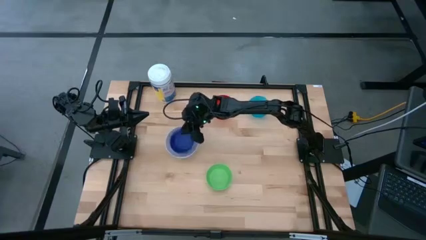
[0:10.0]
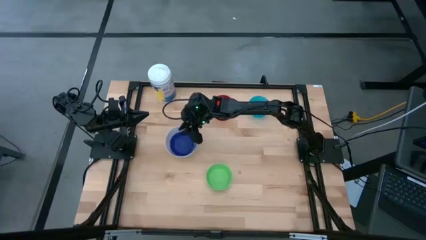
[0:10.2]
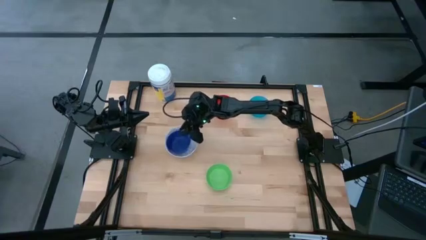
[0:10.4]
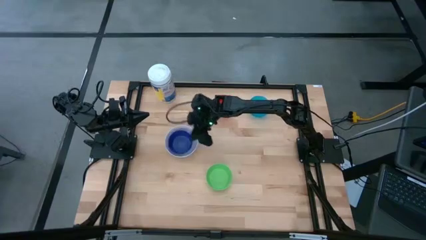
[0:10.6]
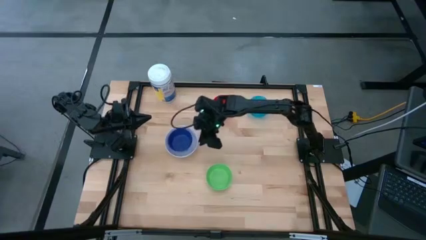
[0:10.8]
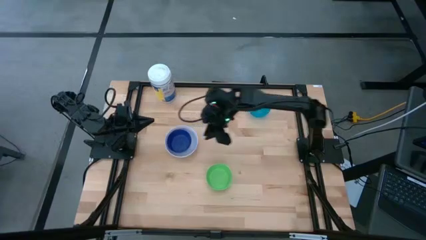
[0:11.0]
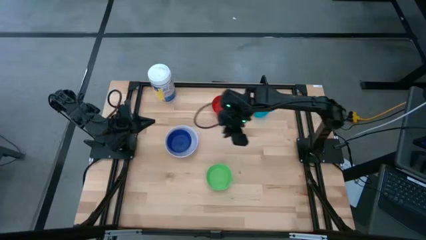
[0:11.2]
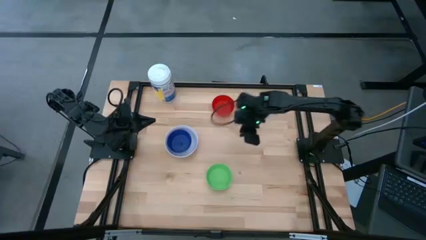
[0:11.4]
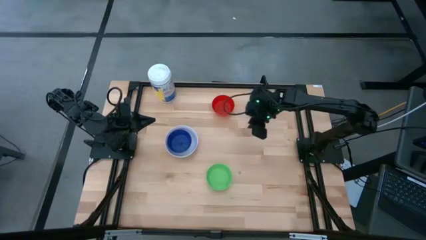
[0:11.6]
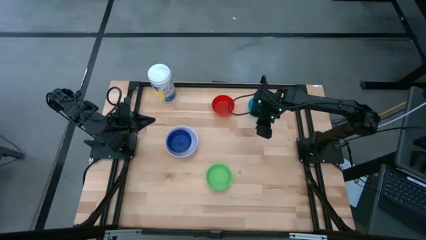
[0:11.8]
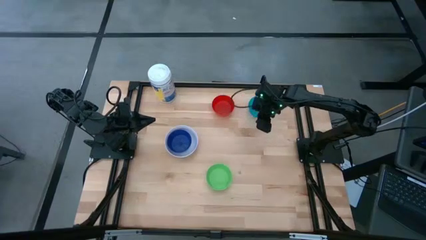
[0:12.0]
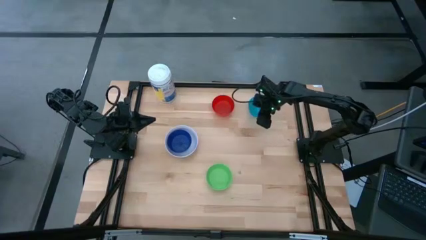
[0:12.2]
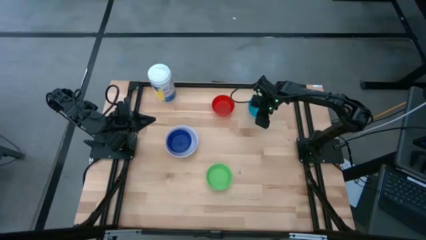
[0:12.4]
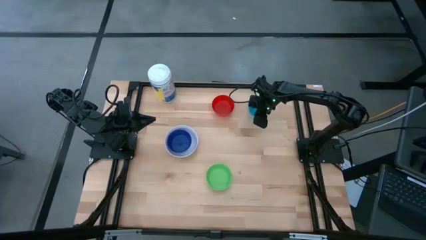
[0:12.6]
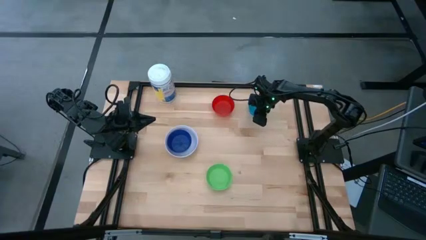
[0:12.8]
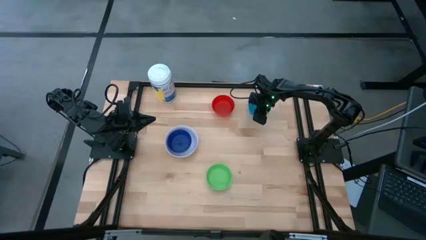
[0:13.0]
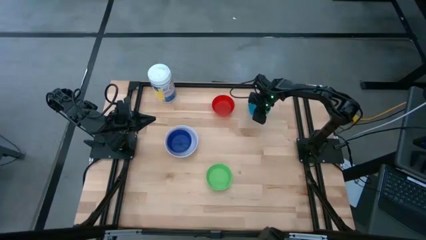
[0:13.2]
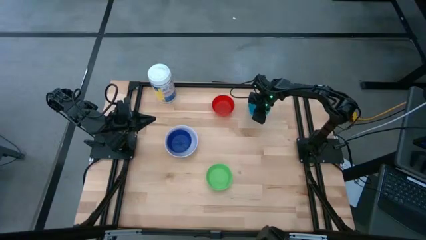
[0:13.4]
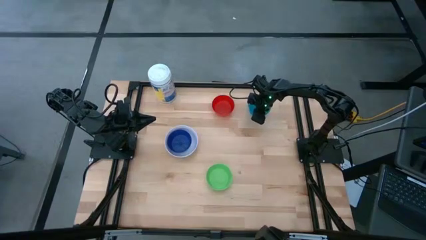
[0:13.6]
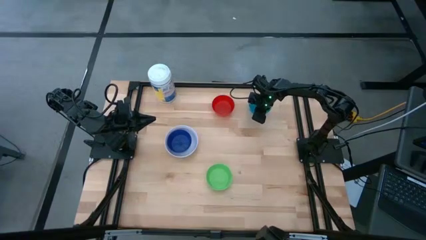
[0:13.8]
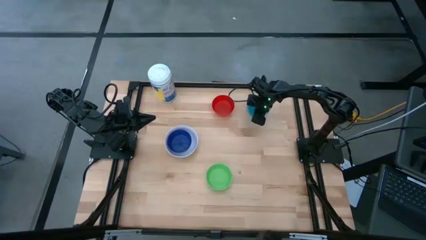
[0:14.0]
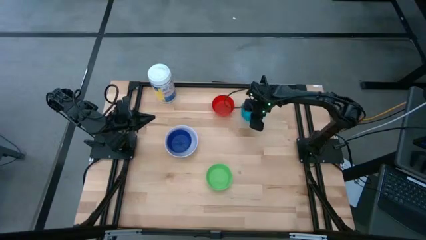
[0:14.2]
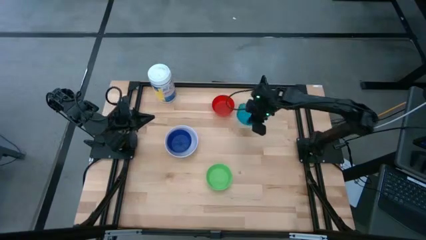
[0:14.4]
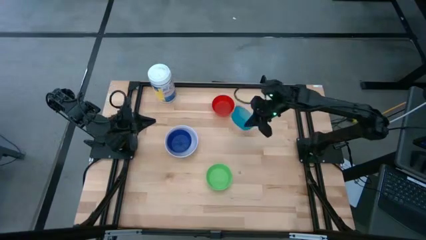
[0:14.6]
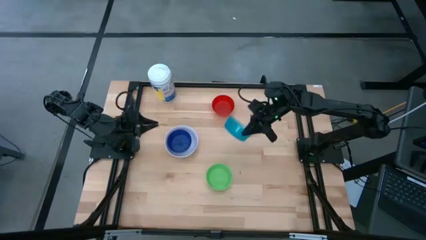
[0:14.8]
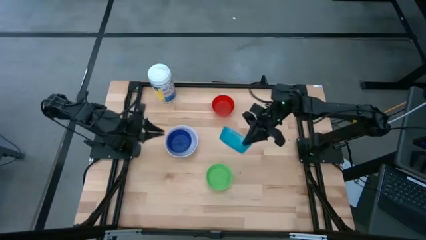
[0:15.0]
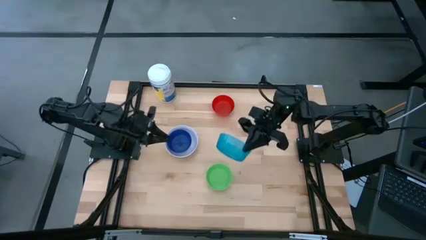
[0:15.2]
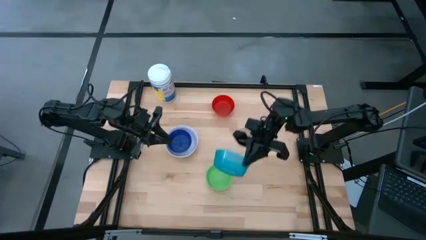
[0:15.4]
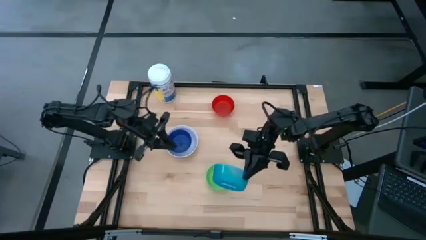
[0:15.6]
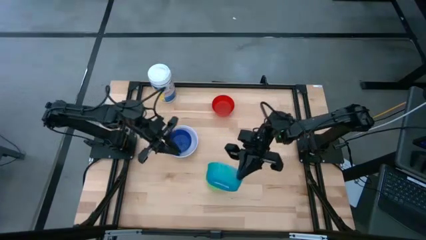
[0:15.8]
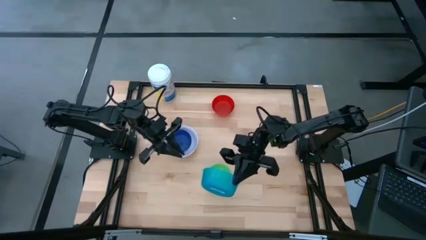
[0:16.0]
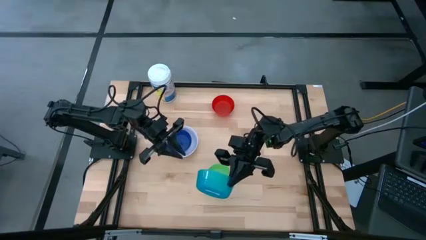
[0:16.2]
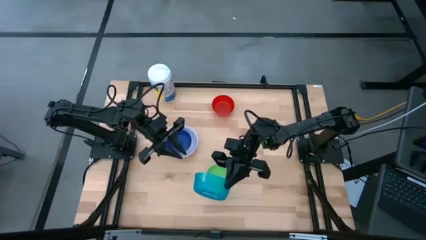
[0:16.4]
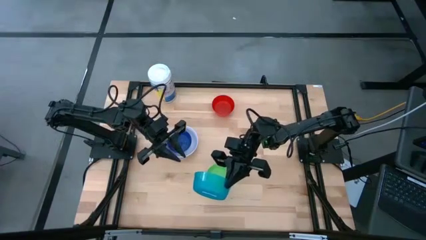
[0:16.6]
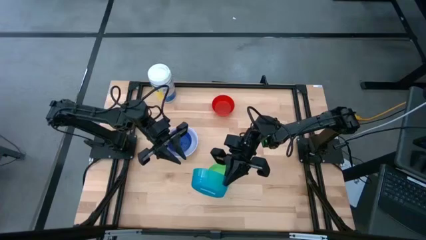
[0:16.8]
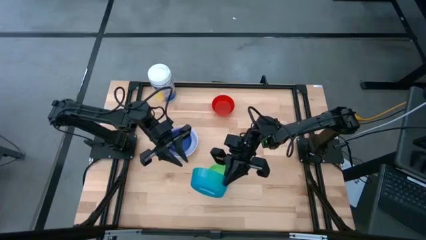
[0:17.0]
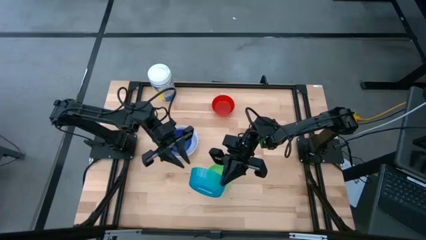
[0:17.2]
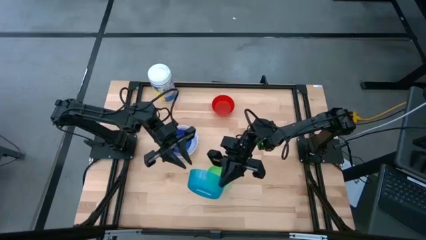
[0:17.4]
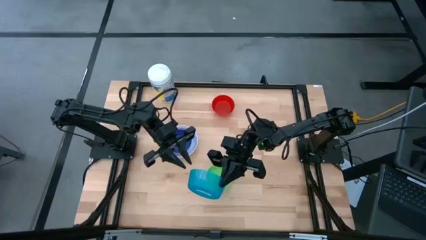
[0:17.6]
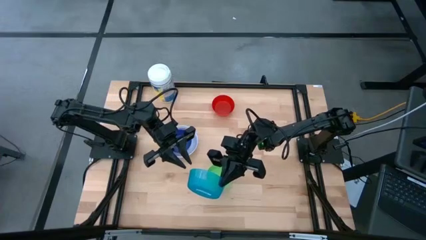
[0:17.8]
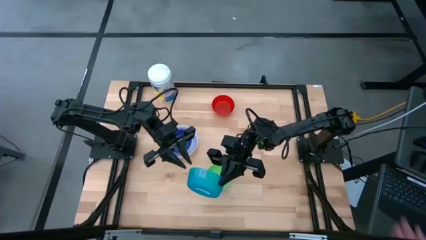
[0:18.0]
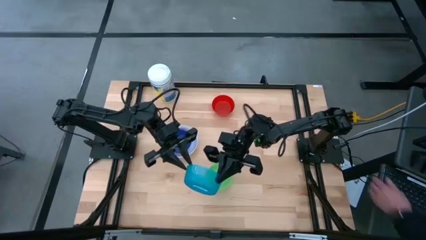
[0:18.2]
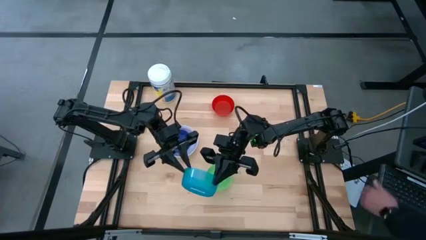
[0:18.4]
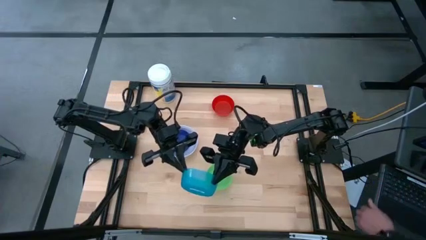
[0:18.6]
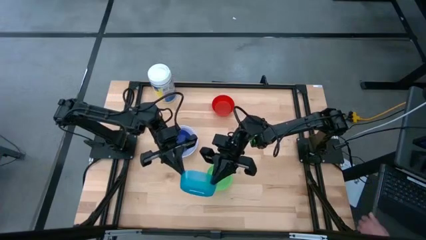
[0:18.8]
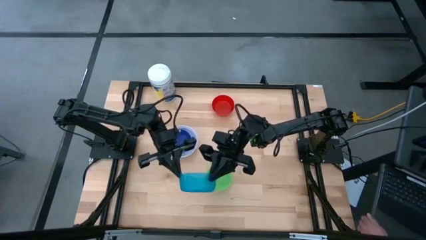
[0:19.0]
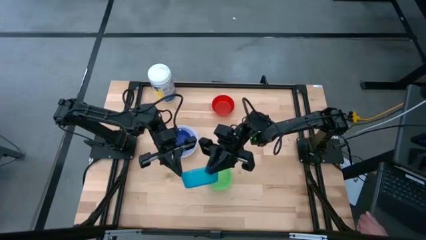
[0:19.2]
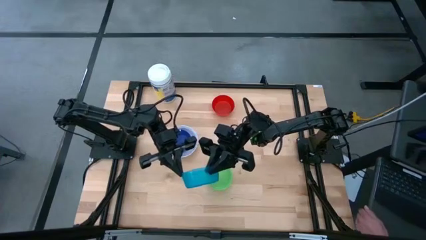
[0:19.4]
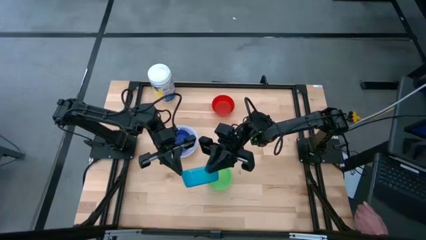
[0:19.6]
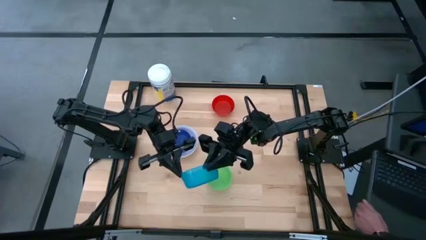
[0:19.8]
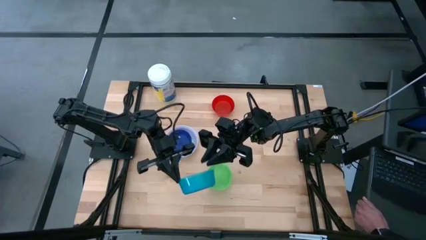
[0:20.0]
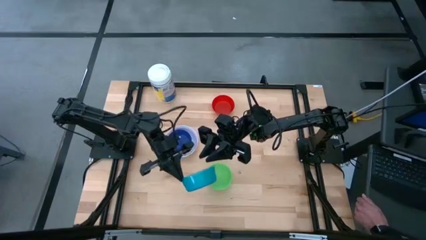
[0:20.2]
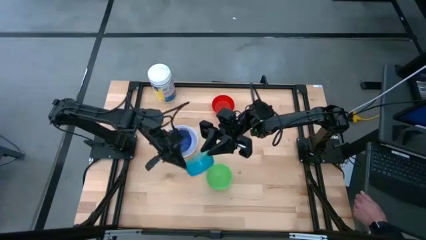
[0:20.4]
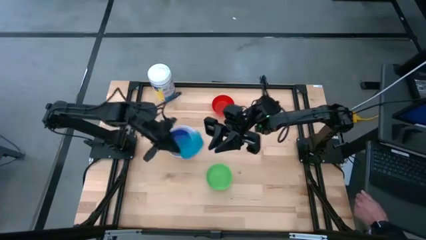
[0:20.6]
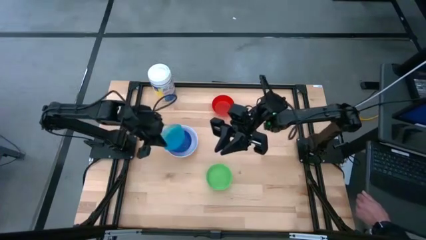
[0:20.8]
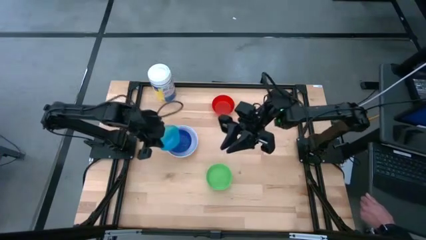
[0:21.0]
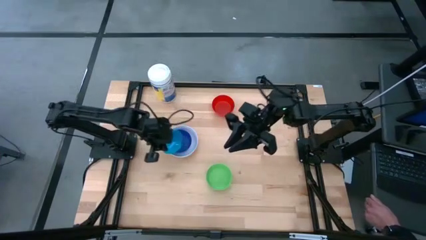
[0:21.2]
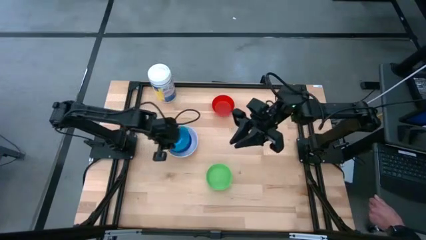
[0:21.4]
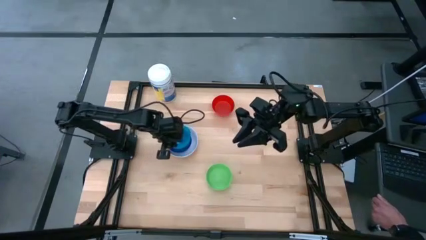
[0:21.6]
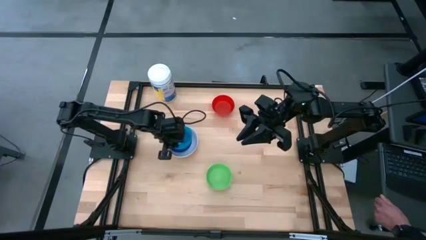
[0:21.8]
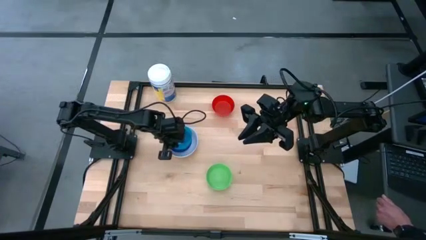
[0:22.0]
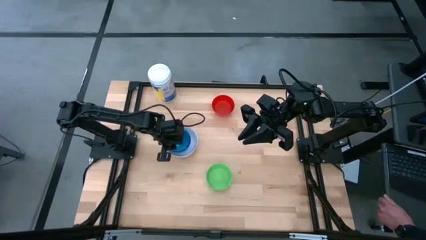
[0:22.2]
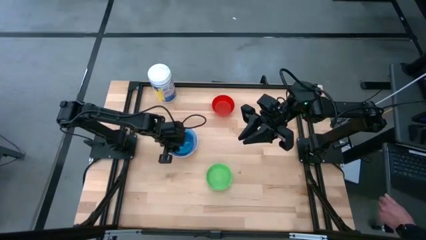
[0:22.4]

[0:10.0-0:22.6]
Stack the blue bowl on the dark blue bowl
